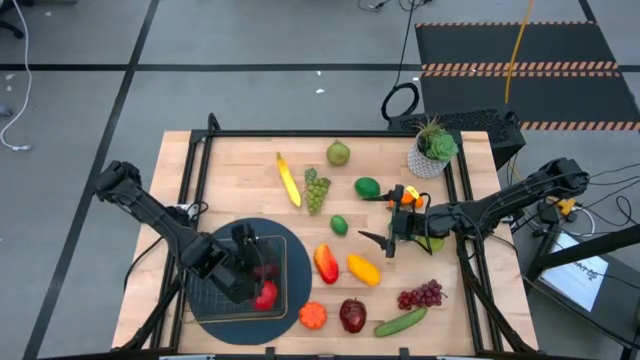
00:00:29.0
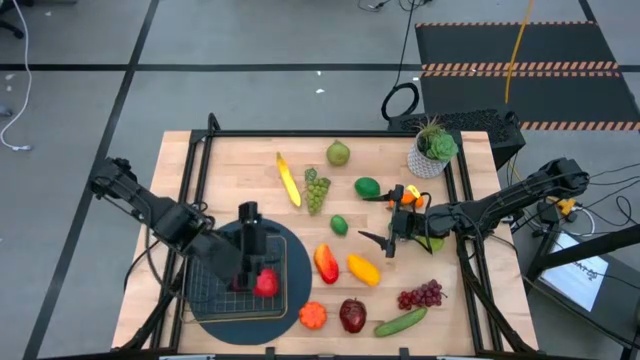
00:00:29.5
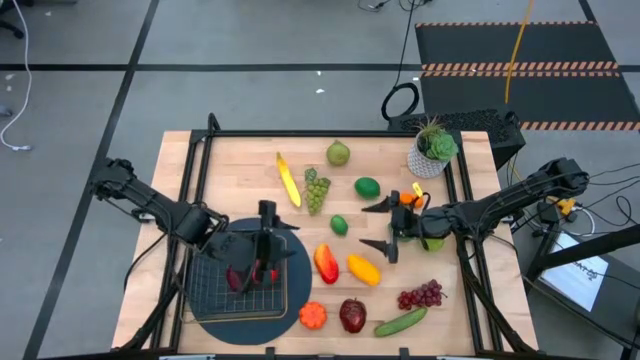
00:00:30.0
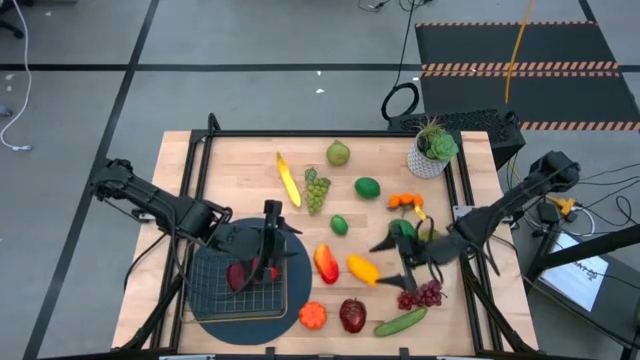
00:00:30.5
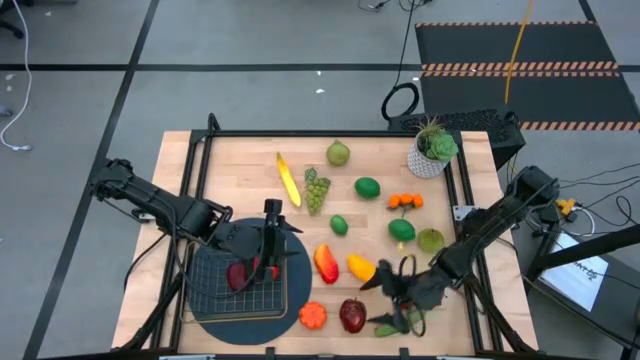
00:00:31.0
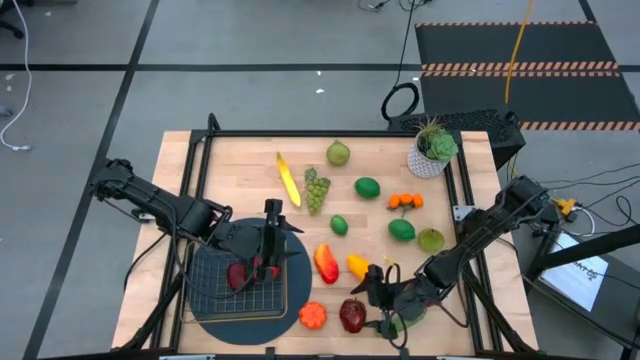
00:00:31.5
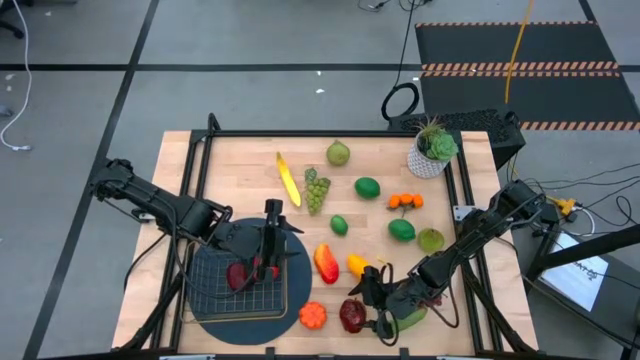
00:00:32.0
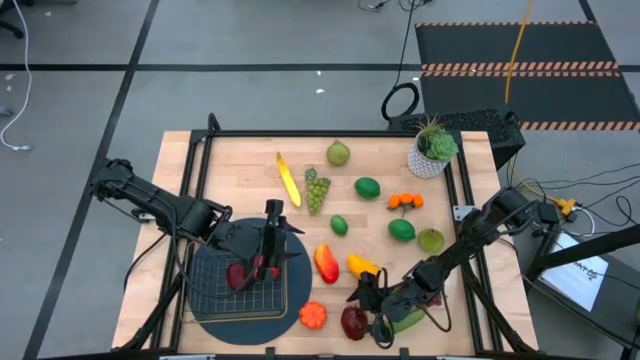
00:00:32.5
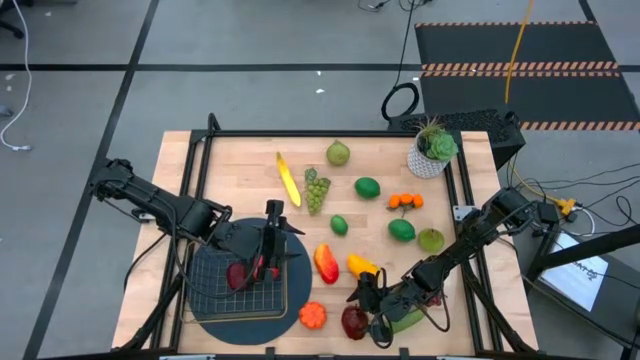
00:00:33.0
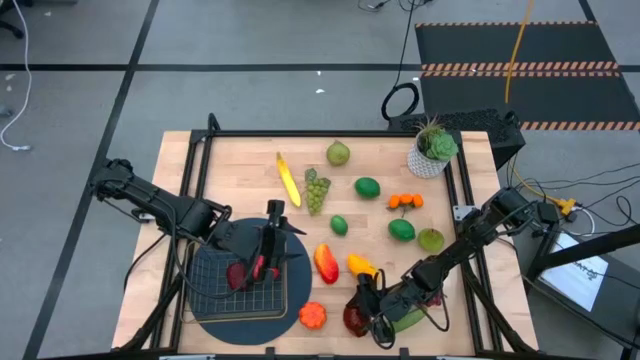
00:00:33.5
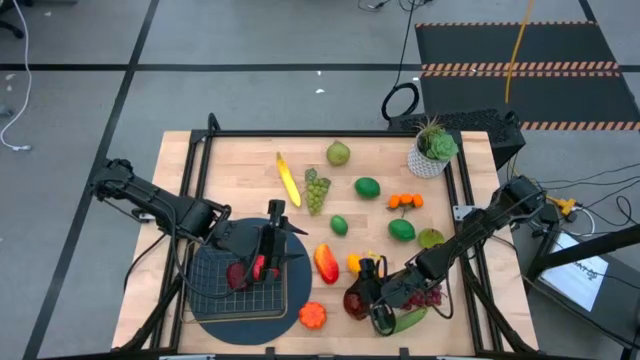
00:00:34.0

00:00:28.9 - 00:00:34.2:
Task: Build produce basket
Put the dark red apple into the gold wire basket

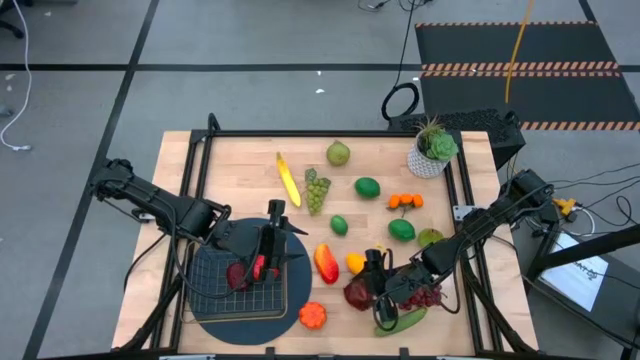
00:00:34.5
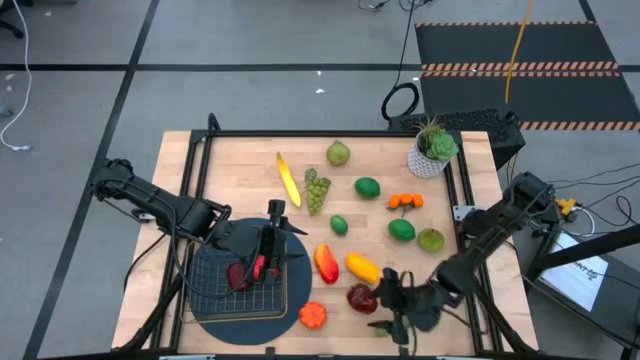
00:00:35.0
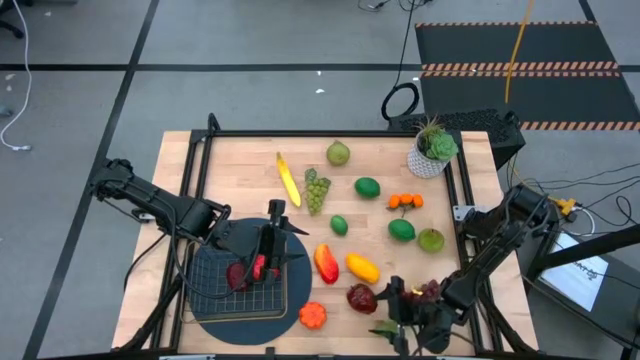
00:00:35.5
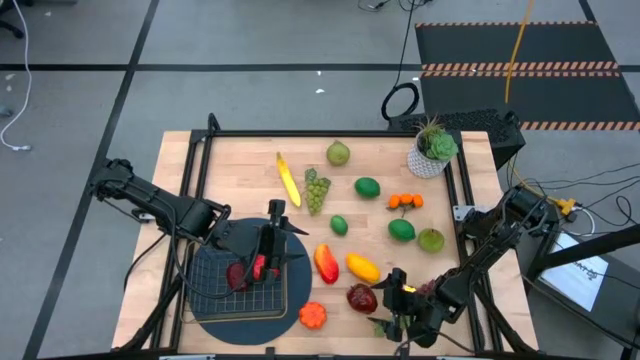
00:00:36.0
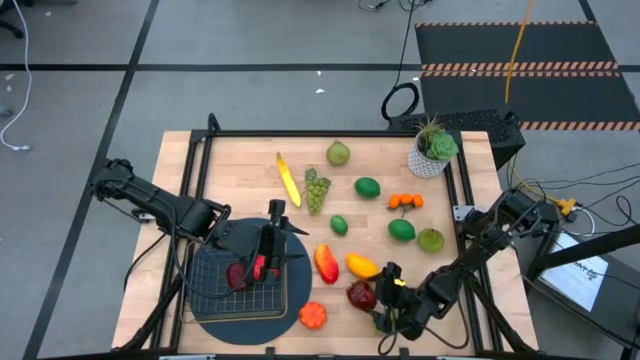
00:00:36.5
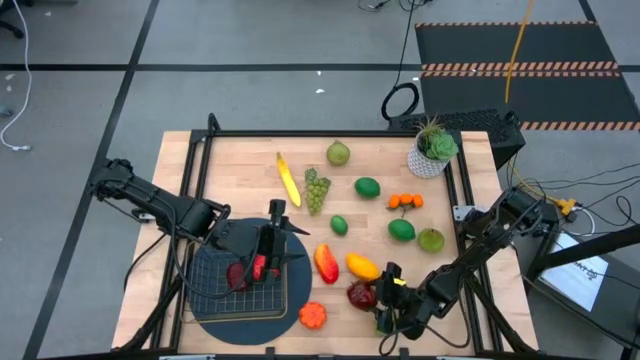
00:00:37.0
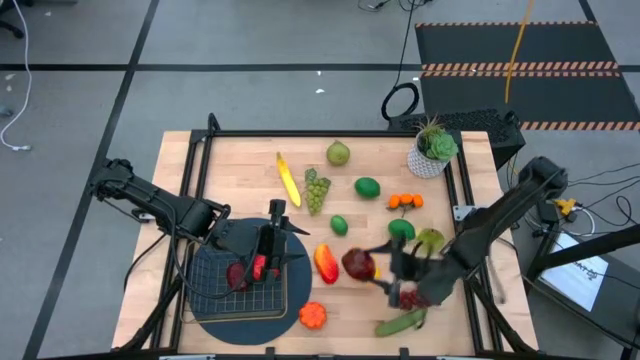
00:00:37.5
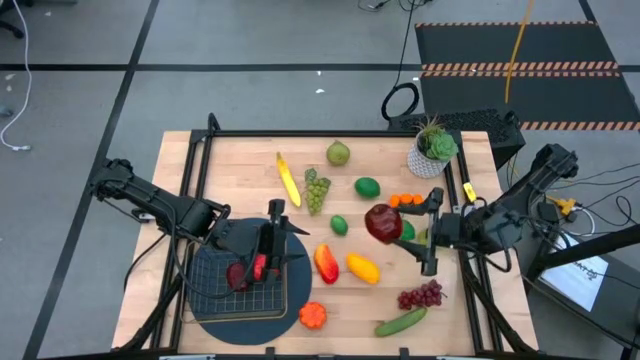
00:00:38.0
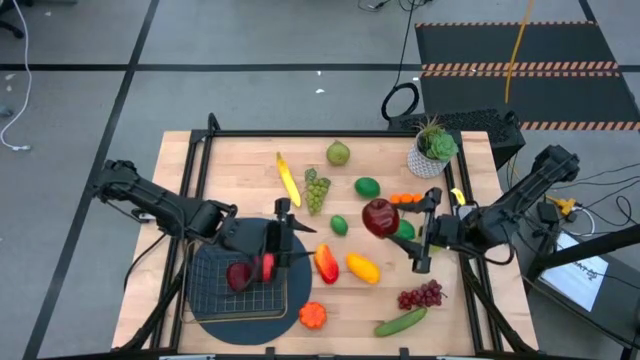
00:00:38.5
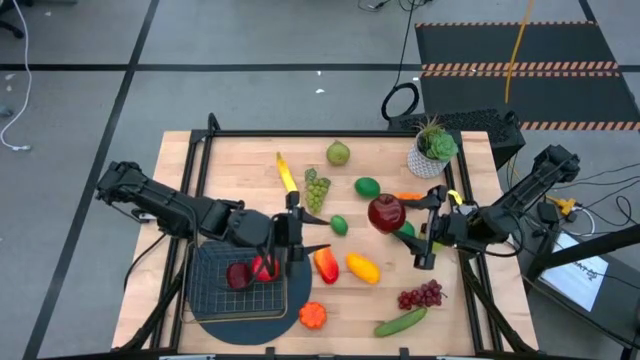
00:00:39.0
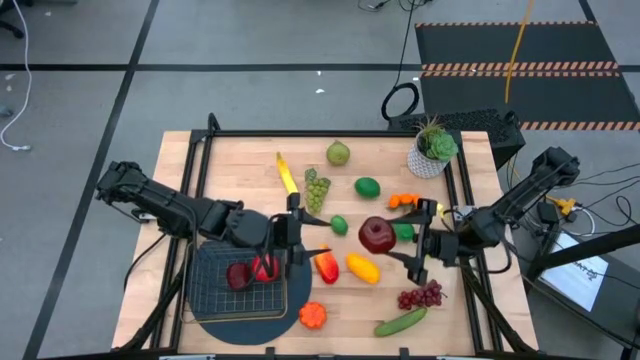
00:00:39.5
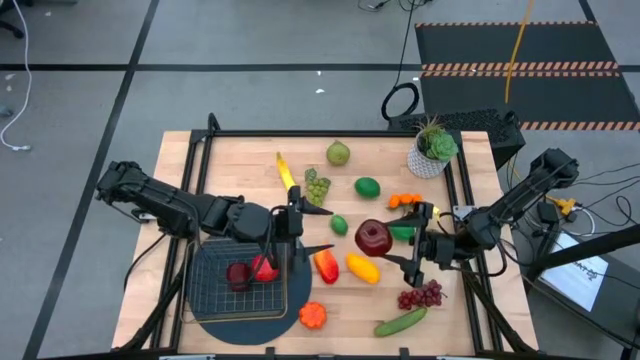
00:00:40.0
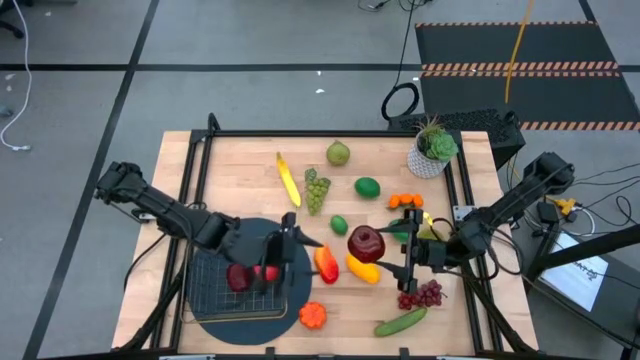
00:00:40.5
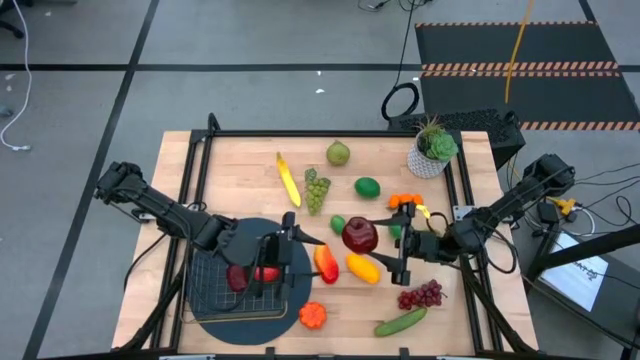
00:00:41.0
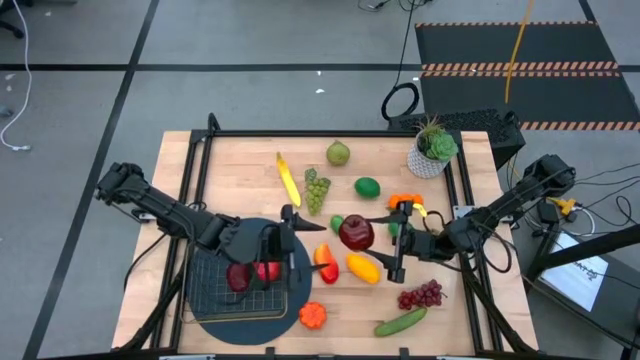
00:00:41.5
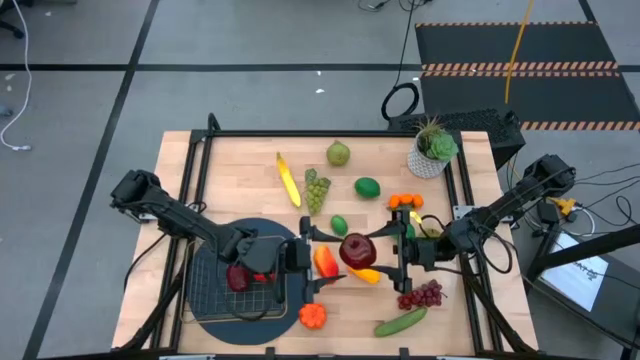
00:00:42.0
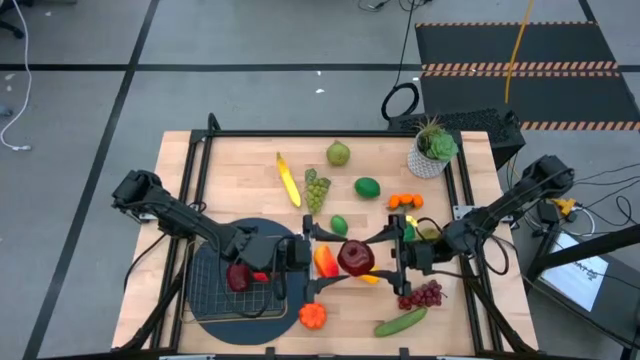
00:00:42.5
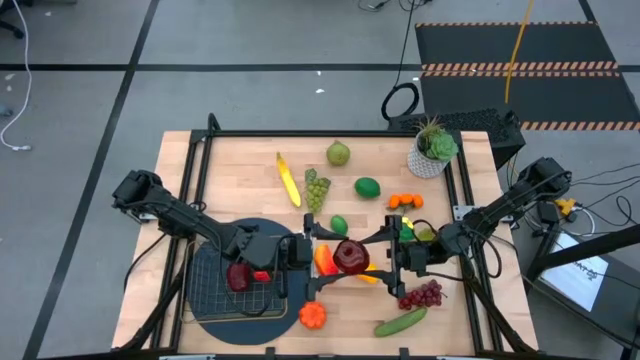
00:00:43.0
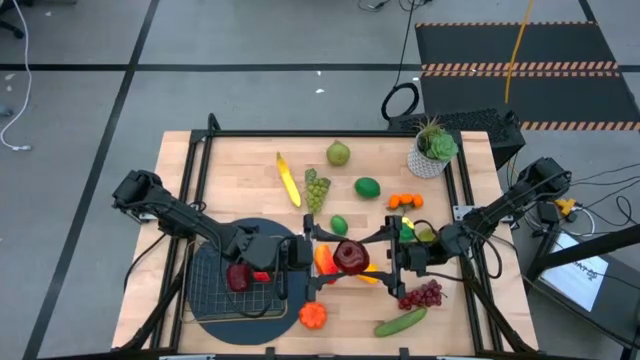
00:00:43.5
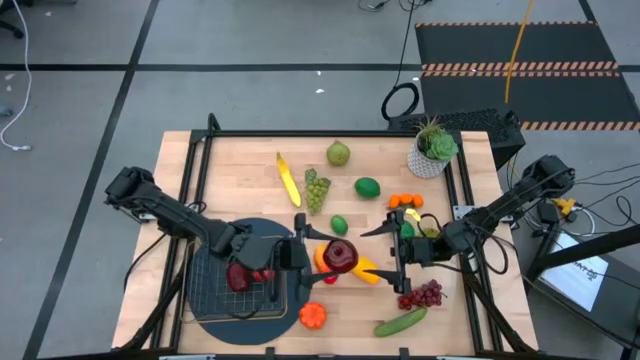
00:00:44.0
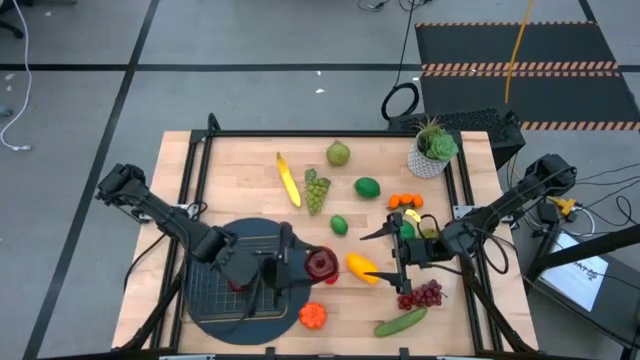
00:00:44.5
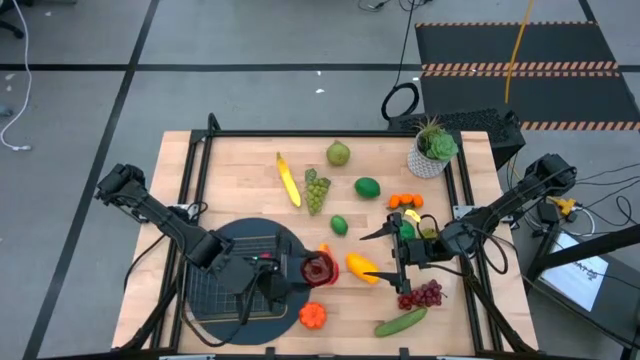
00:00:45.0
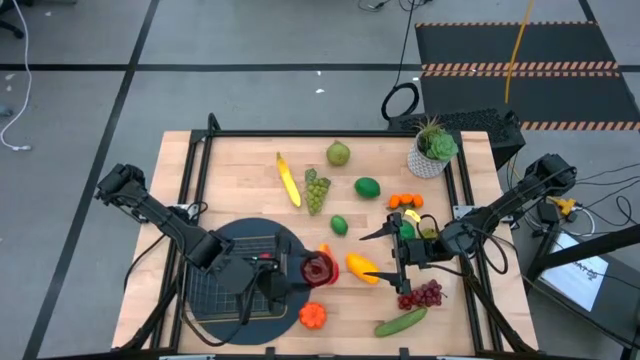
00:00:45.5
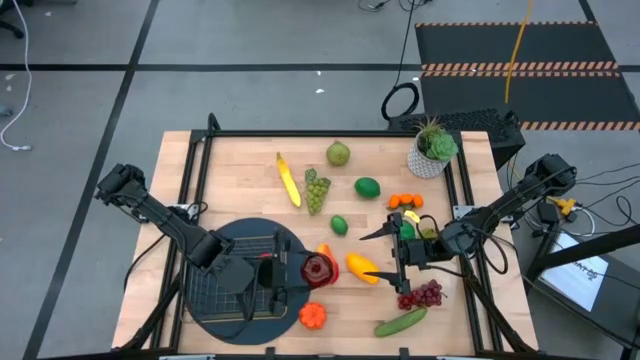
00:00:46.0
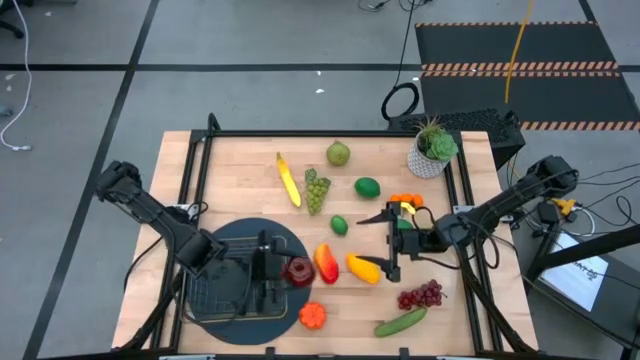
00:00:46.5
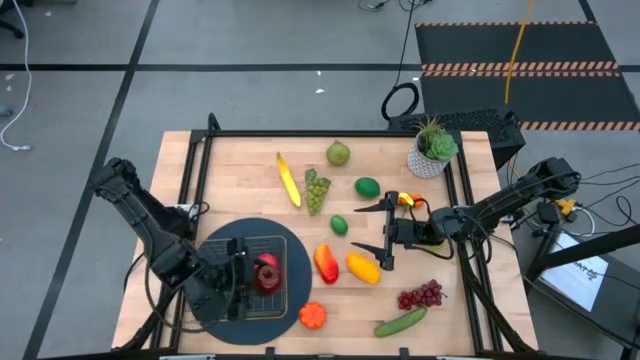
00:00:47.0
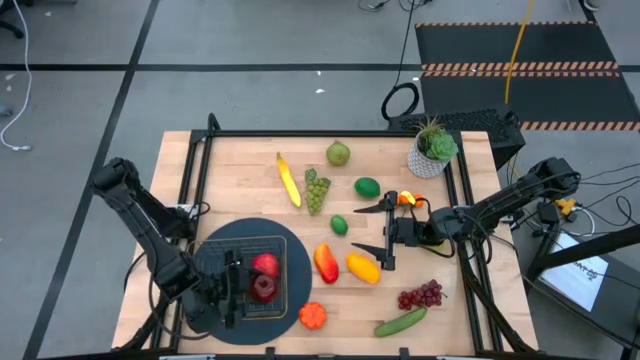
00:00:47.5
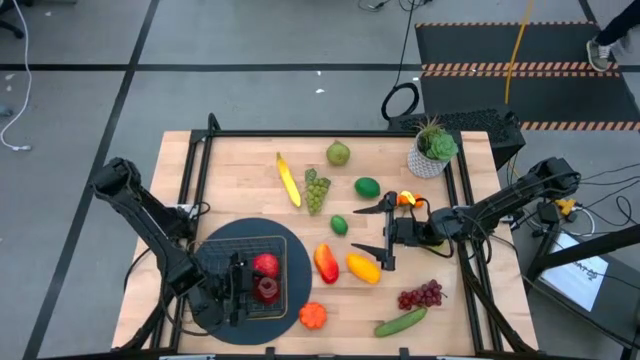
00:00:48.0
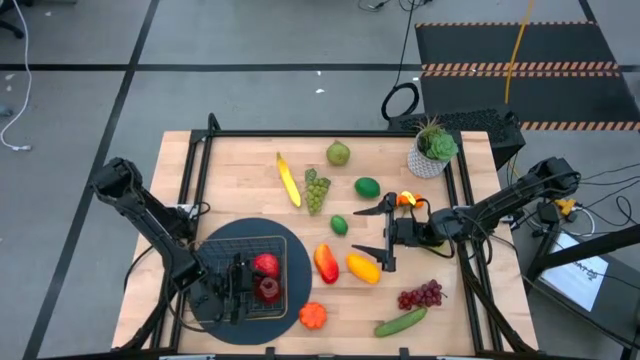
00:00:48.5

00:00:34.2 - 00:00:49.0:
Put the dark red apple into the gold wire basket
